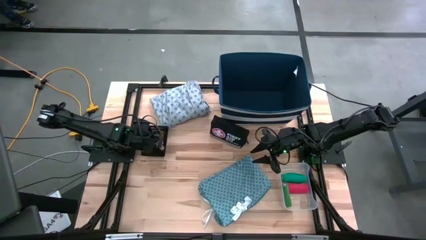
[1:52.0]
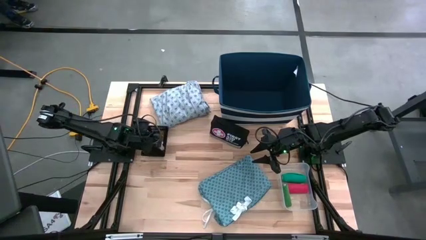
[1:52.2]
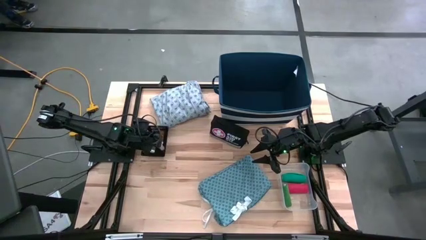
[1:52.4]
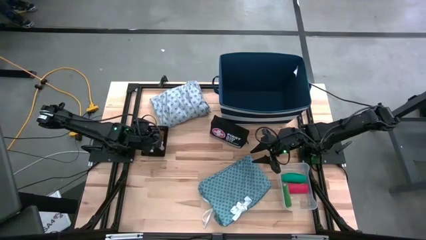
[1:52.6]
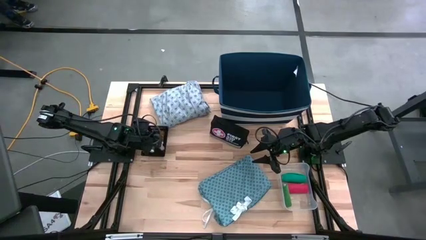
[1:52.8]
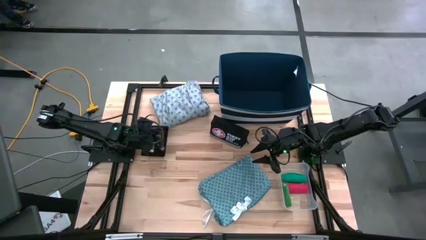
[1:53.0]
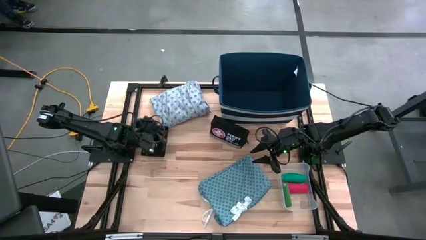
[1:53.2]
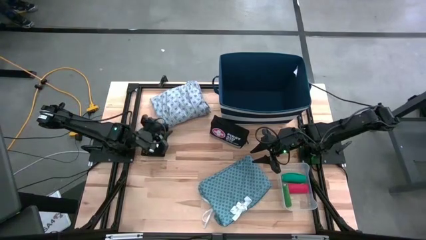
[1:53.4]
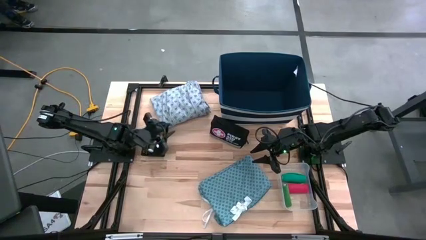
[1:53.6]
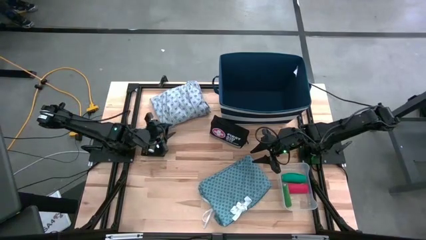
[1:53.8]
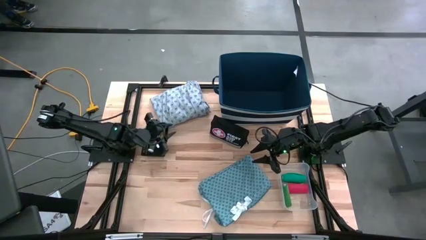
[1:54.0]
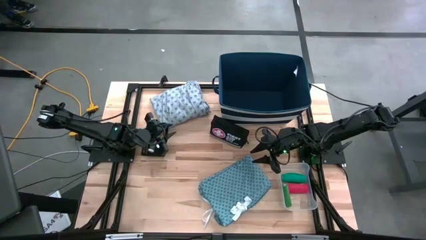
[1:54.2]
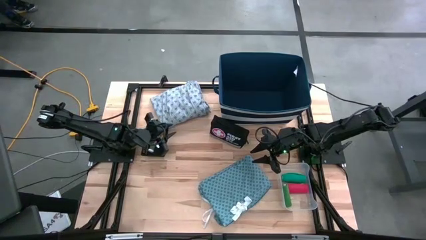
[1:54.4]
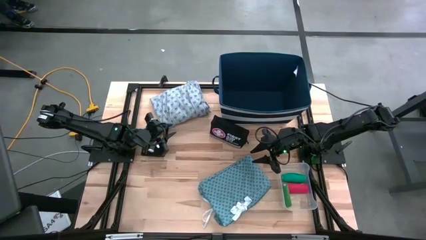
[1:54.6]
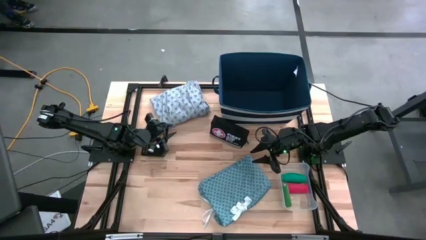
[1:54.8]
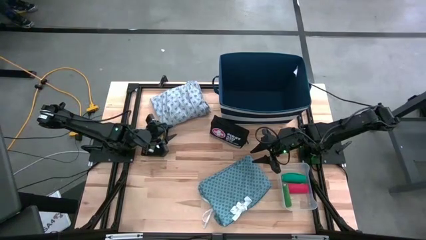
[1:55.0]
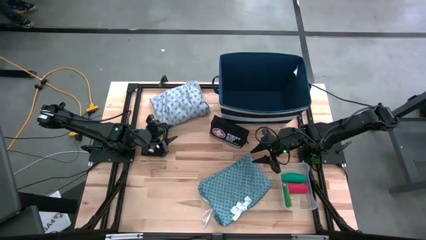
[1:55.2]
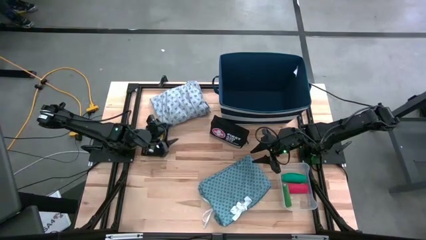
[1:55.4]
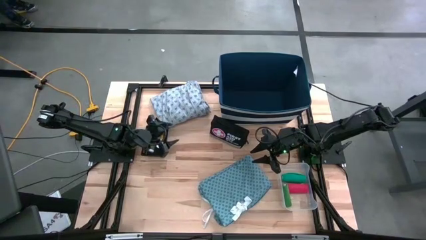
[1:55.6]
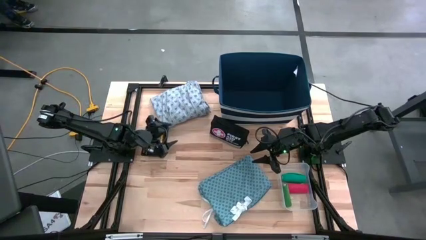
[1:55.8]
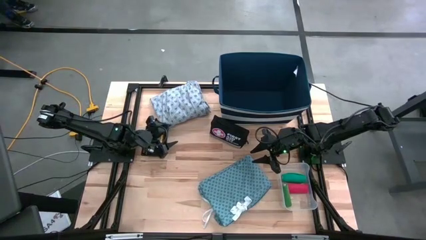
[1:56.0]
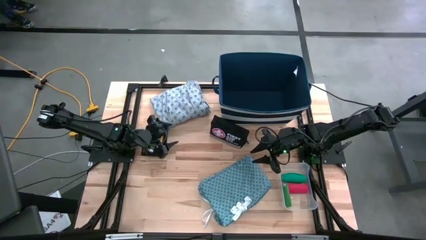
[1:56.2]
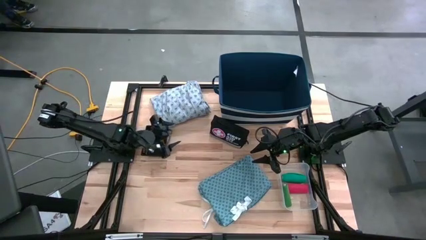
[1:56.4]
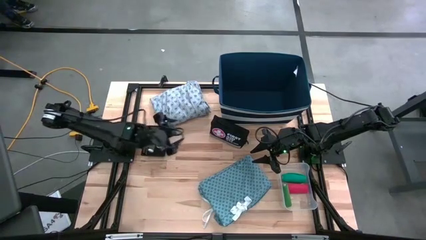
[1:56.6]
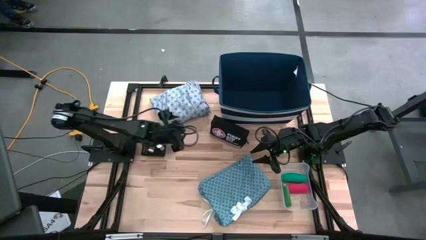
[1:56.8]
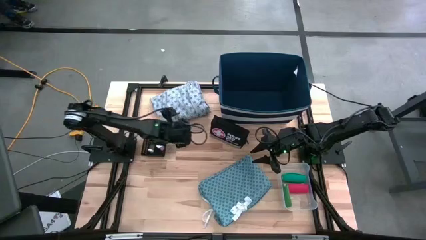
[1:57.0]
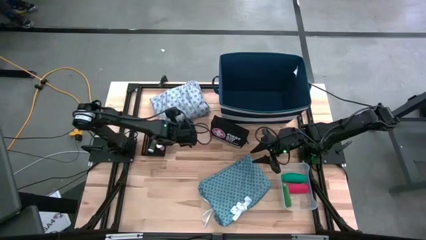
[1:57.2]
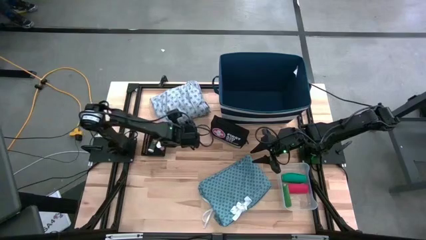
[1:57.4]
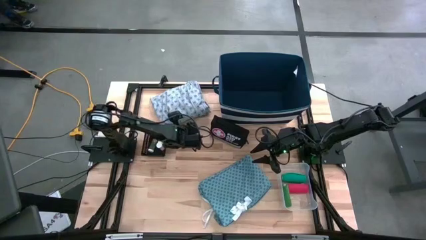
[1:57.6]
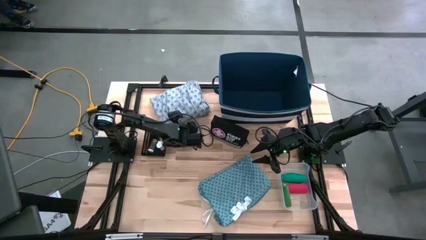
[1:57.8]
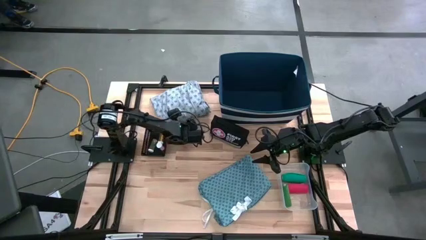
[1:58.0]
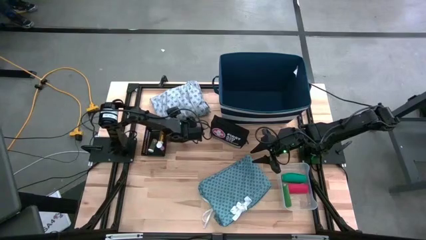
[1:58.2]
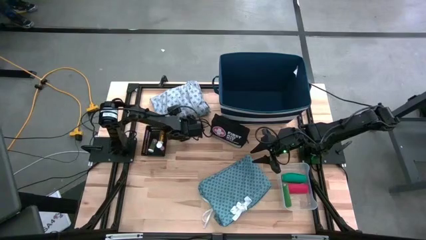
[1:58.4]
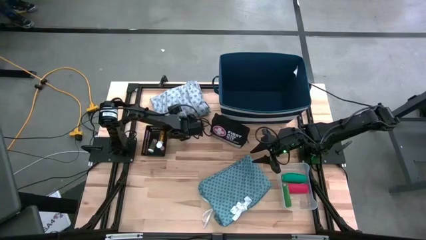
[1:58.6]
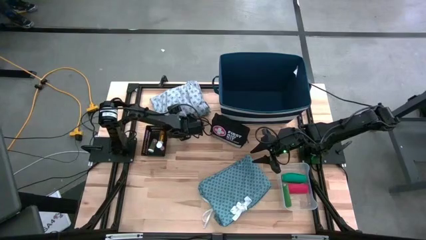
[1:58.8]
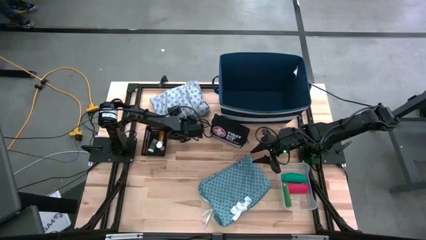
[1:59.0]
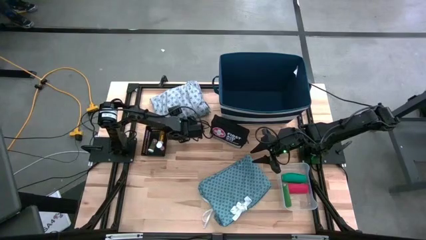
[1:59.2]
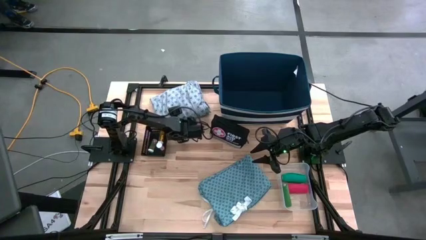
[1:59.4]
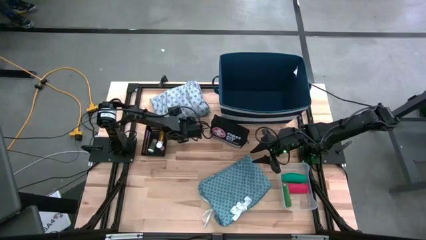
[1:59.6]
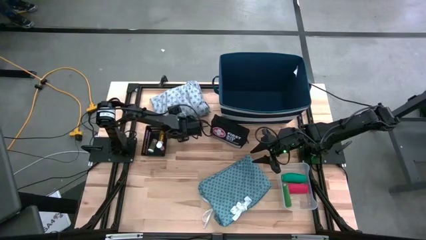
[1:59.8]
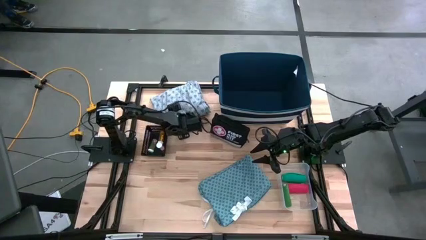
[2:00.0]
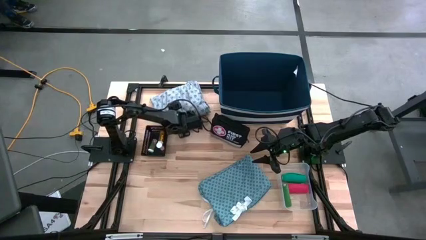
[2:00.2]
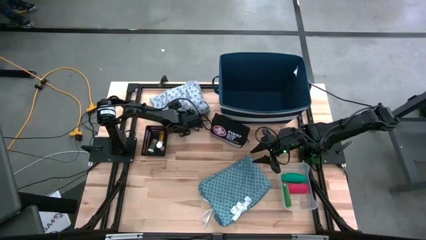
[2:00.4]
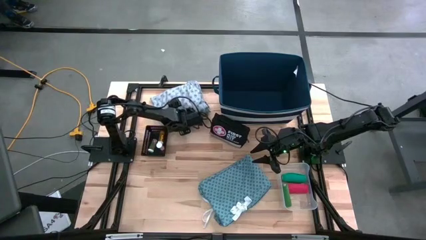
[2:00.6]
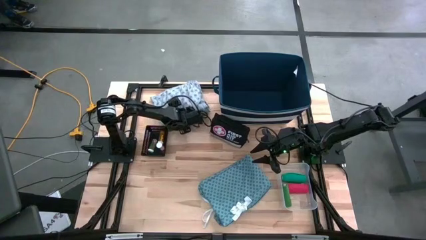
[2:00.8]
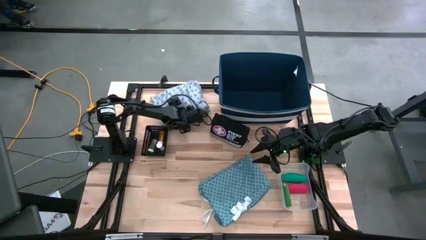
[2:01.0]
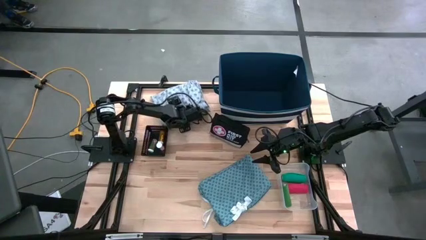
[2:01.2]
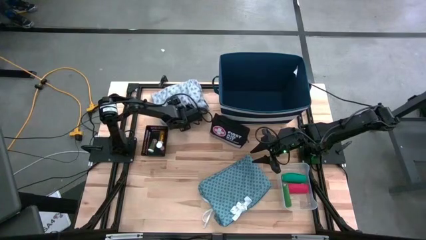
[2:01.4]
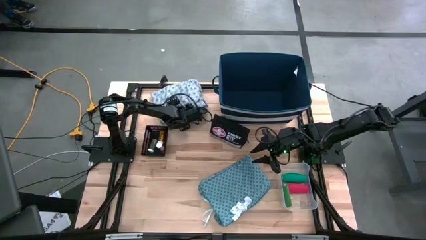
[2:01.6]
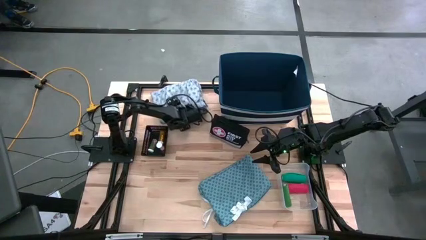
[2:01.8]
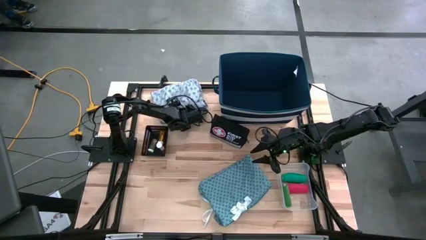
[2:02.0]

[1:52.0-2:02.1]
Task: Pick & place medical supplies in basket/bin
Put the white patient gown into the blue laundry organizer

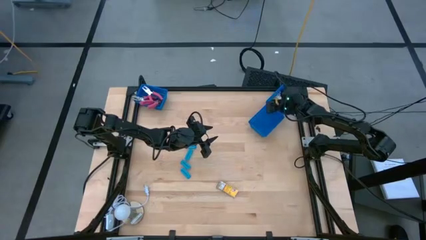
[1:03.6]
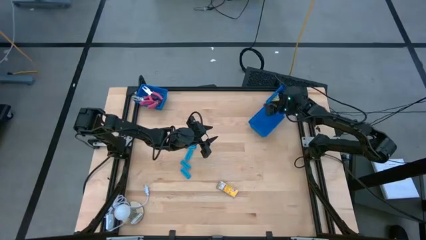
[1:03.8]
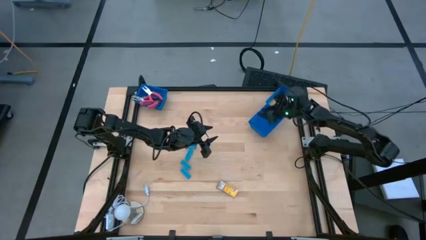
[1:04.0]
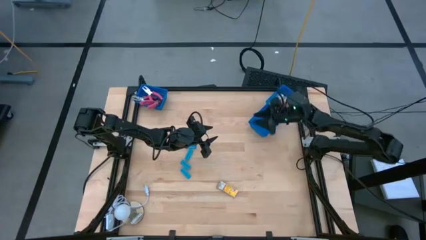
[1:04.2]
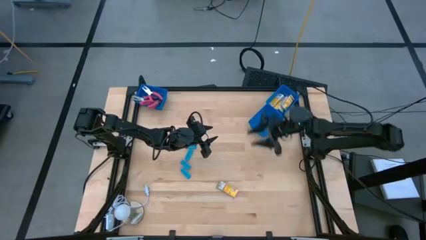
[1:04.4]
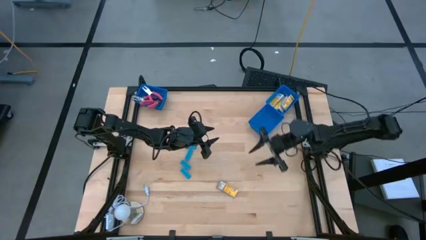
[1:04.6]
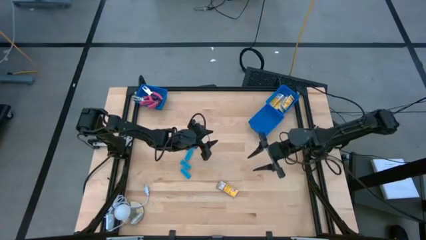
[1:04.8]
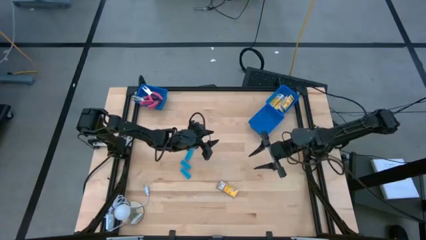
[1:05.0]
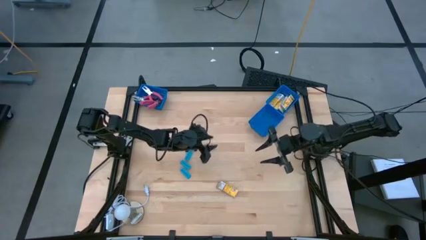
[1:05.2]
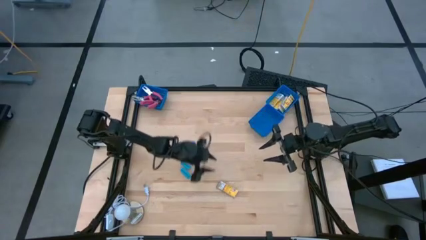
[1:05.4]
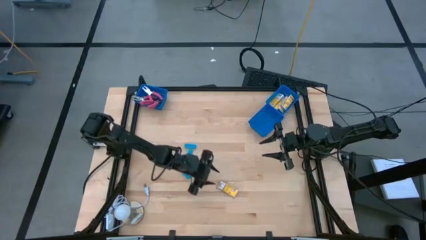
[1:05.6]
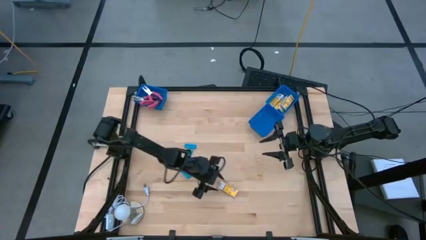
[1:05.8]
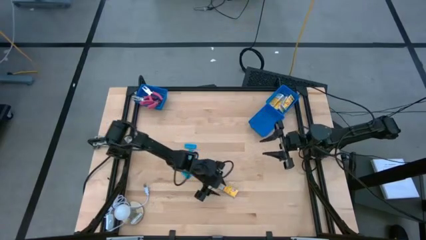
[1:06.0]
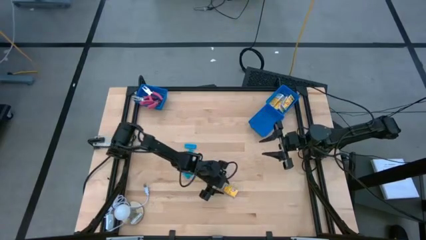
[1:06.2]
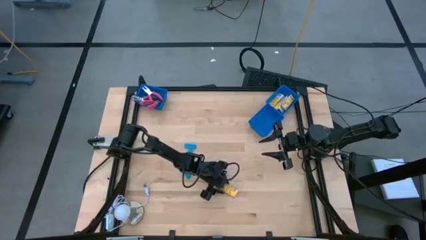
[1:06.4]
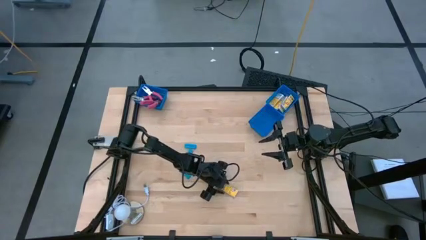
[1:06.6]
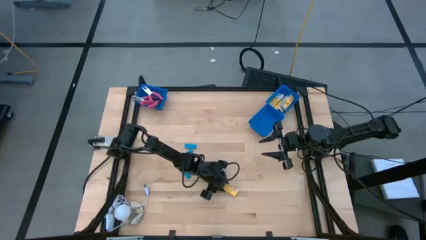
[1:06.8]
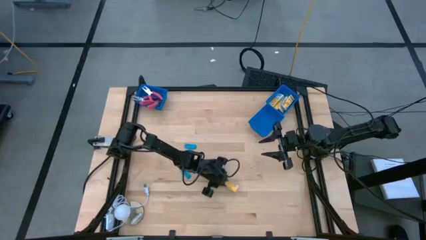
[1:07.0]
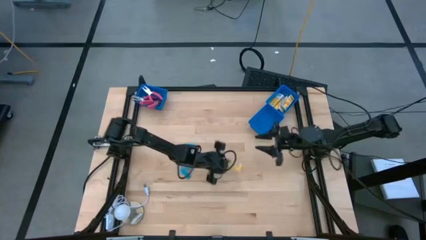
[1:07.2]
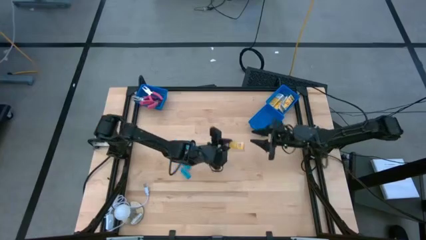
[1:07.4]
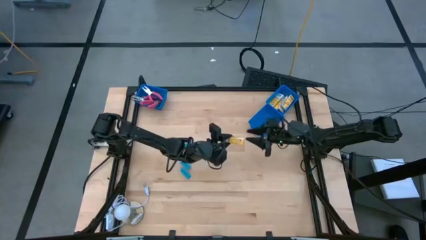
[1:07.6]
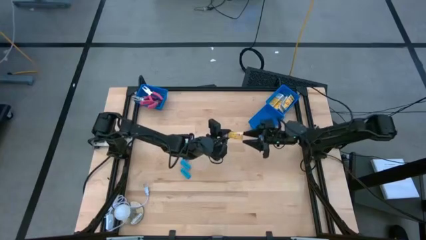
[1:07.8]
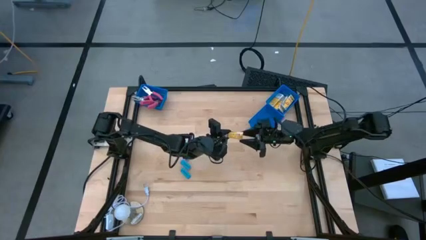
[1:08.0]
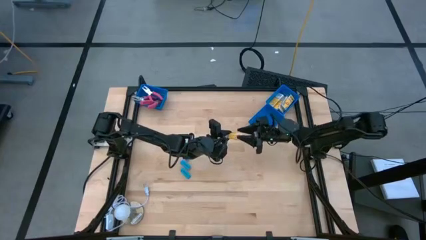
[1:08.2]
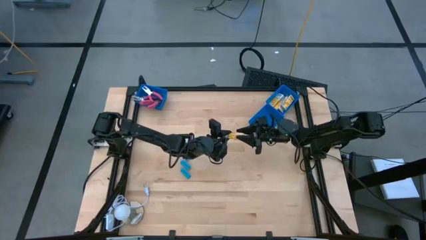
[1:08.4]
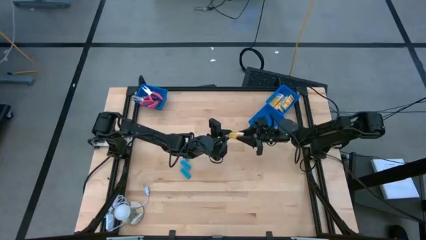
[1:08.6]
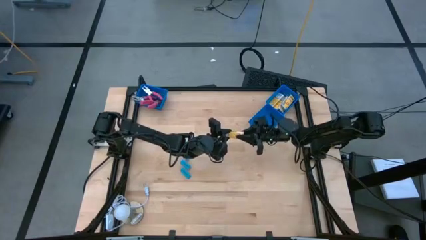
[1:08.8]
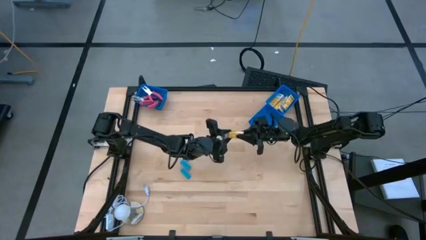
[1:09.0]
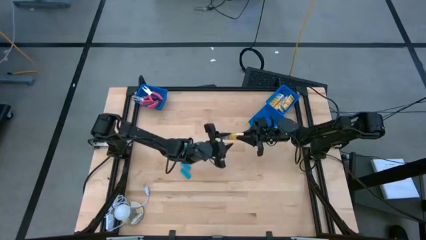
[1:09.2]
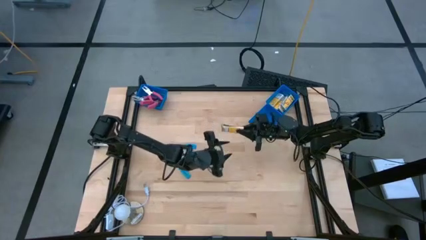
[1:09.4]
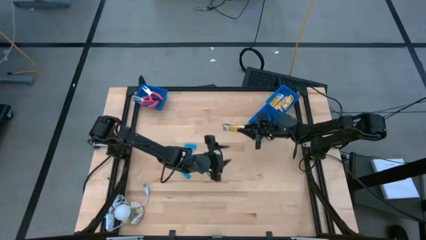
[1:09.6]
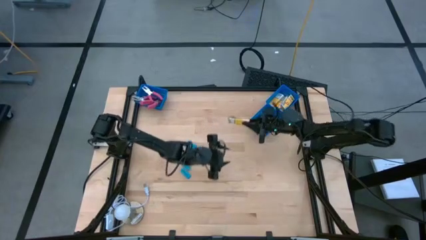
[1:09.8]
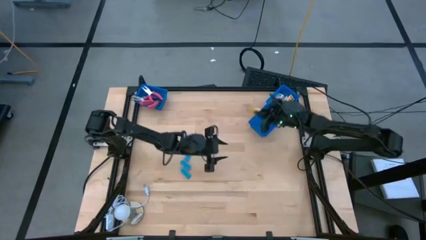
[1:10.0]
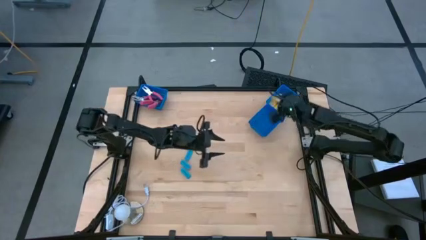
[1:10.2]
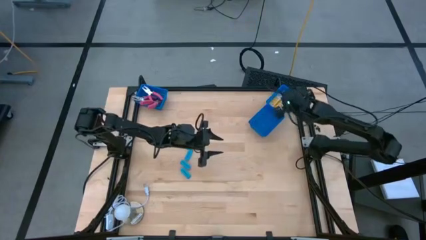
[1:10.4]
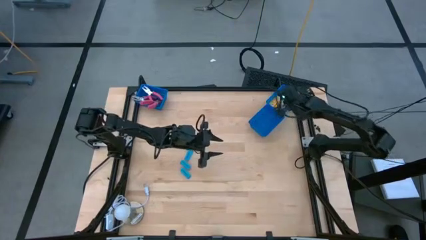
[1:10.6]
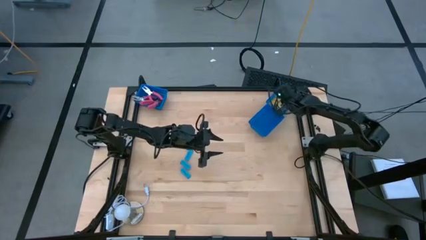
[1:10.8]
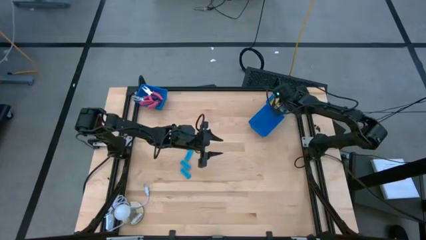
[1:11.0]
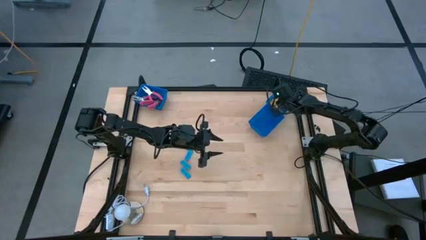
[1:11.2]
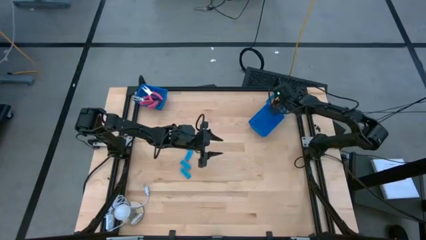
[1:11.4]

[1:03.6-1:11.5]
Task: Pick & Place School Supplies
Put the yellow crayon box into the top right blue basket
